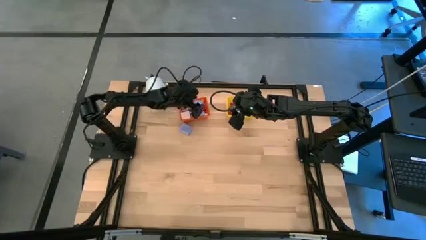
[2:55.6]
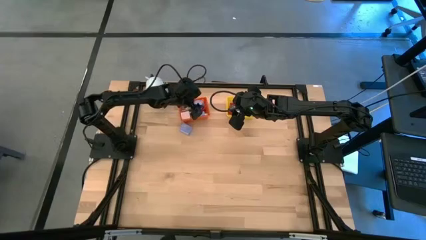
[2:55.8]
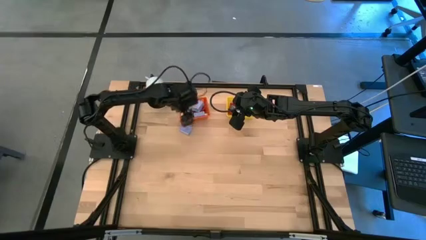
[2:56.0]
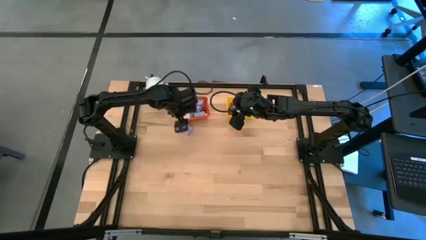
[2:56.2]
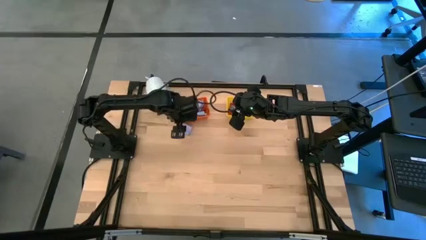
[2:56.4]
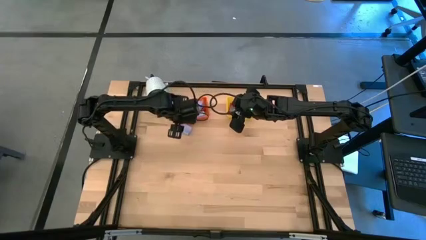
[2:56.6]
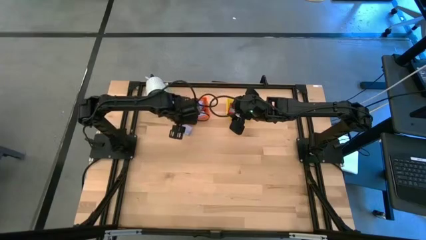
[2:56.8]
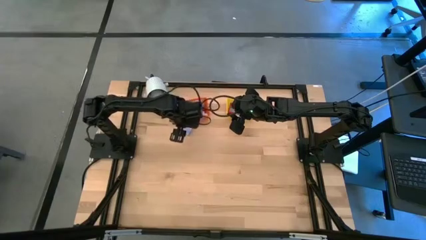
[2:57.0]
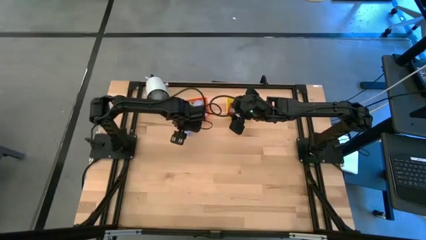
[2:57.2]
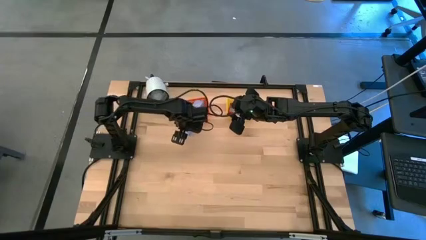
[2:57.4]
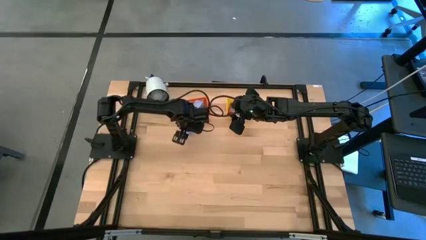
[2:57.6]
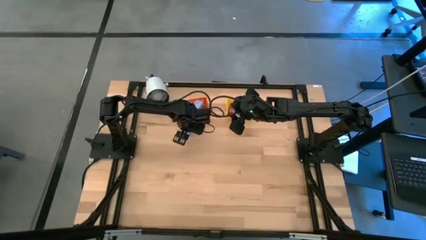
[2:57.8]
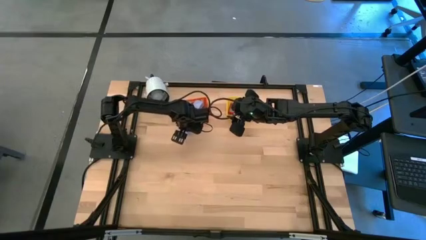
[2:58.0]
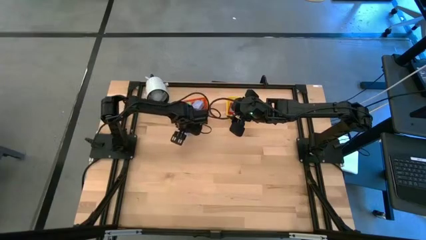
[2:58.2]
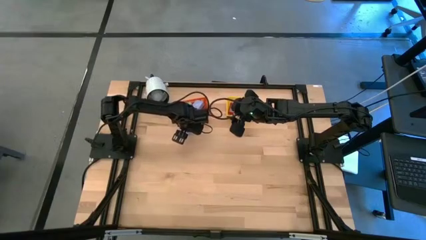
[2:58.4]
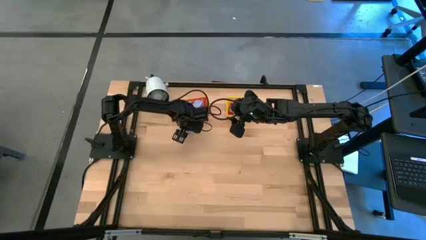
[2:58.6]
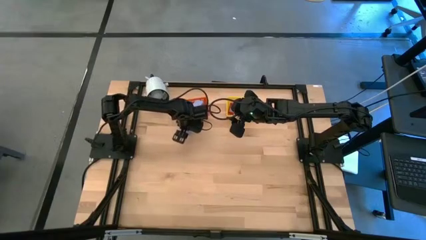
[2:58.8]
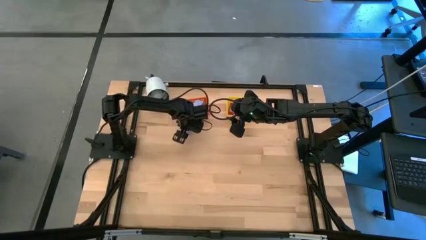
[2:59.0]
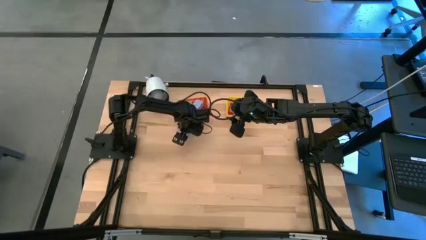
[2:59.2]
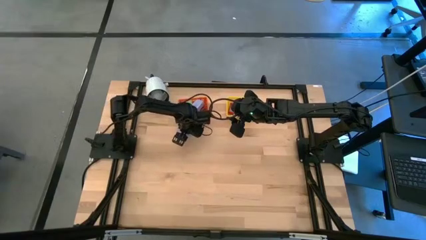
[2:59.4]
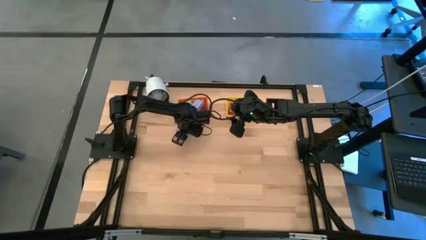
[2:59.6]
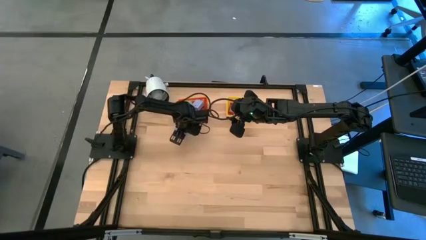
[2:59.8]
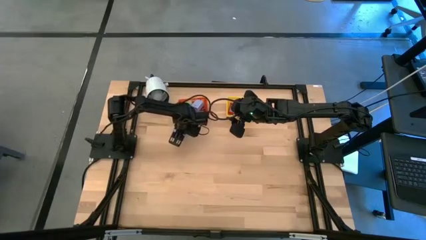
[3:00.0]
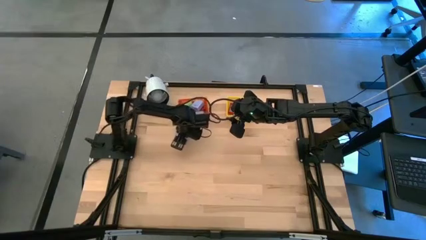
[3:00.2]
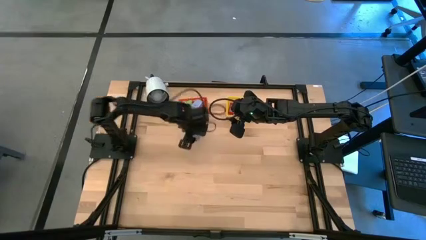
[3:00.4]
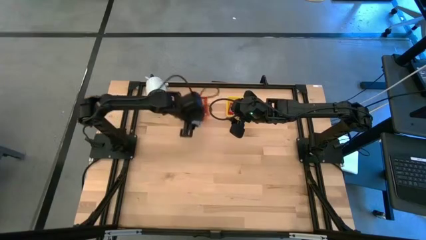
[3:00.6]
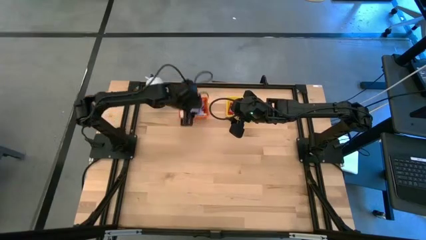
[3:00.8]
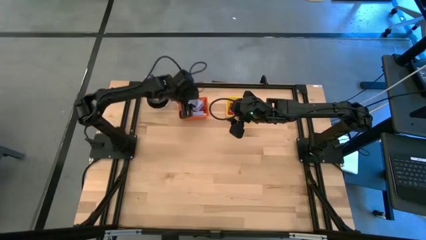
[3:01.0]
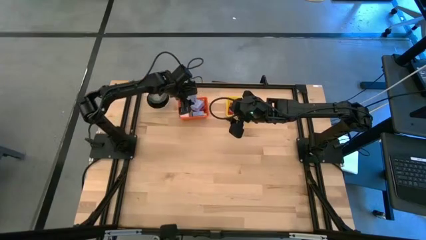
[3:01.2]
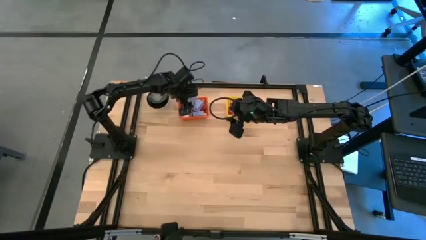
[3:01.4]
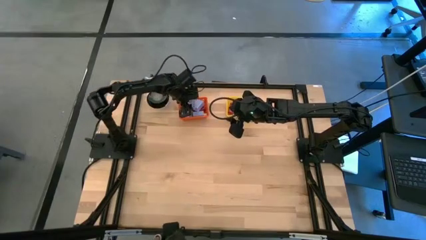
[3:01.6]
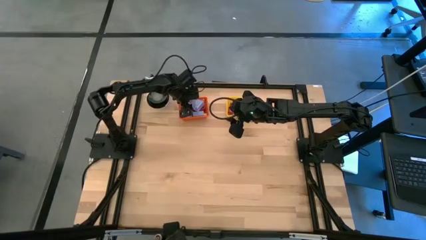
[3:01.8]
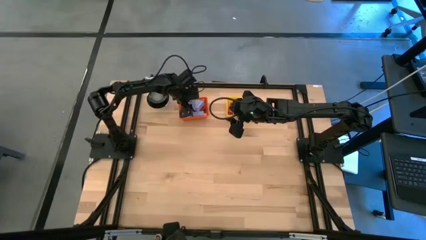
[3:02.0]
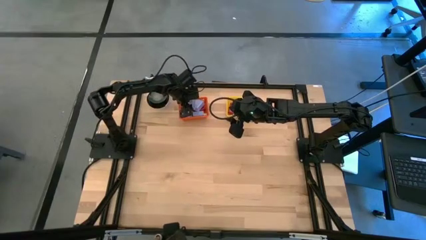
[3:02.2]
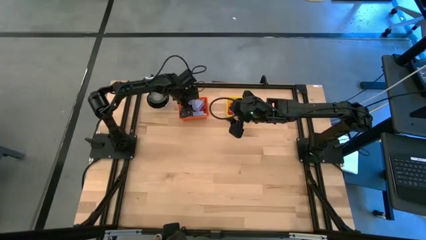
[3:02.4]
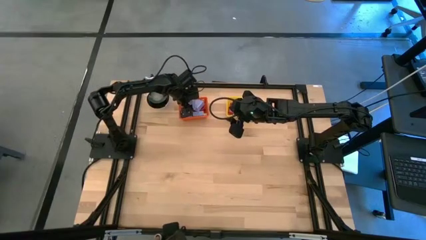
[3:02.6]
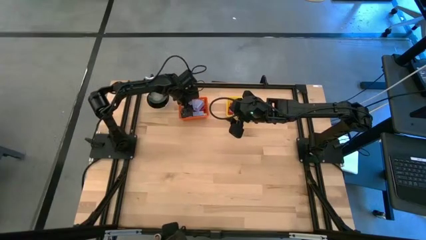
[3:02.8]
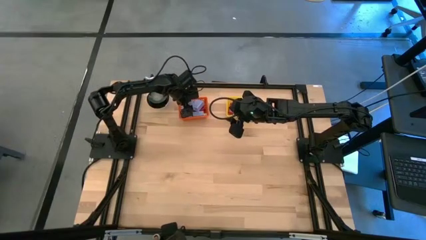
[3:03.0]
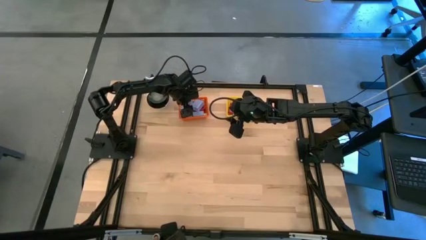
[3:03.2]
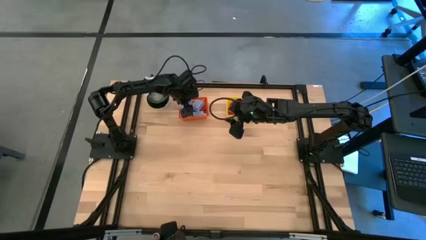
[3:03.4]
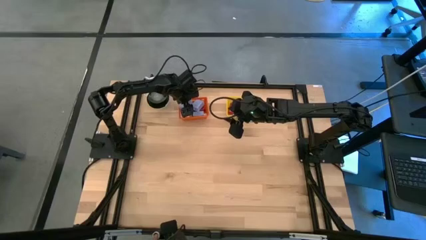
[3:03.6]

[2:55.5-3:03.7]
Task: Pick & Place Office items
Put the purple charger adapter into the orange bin

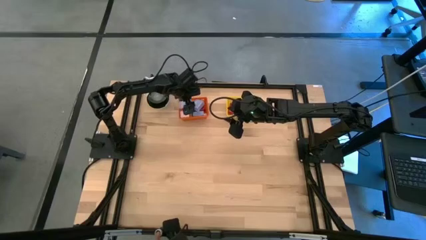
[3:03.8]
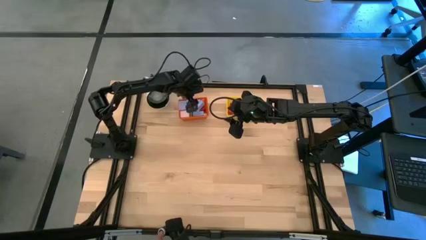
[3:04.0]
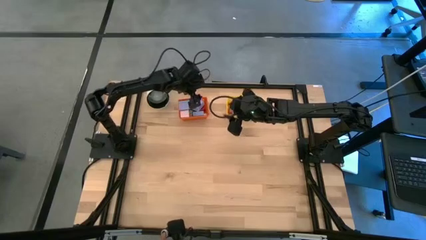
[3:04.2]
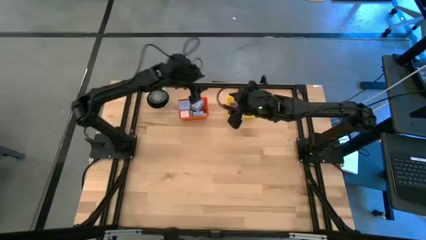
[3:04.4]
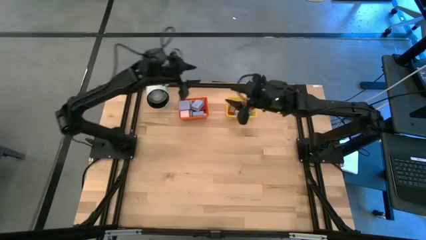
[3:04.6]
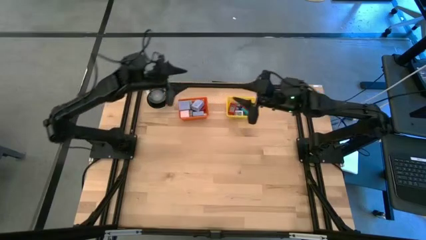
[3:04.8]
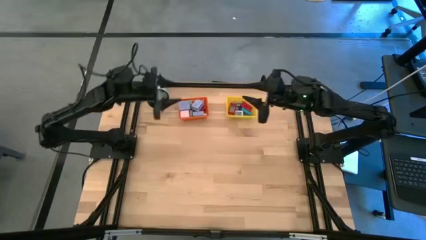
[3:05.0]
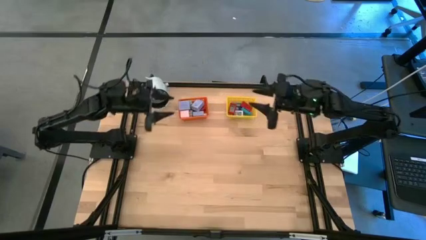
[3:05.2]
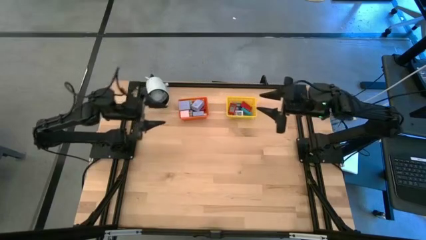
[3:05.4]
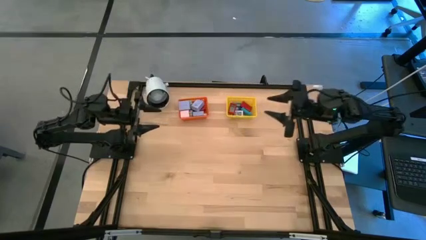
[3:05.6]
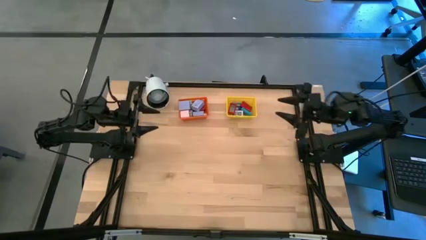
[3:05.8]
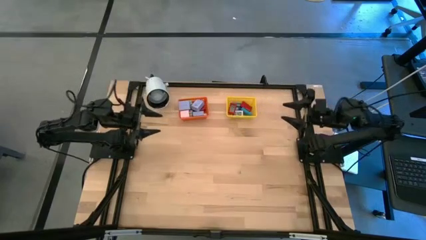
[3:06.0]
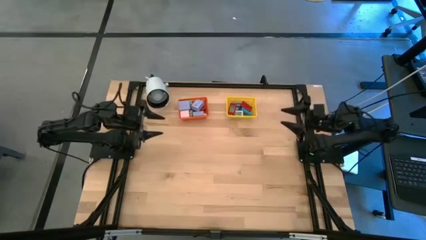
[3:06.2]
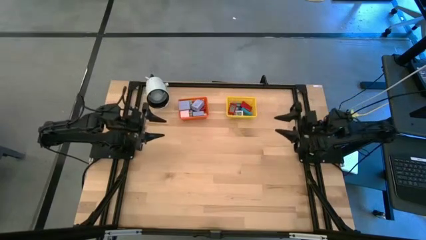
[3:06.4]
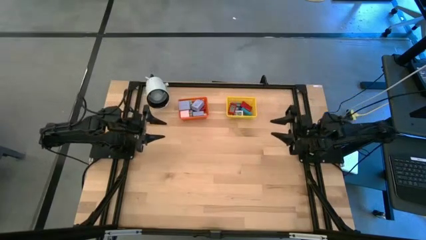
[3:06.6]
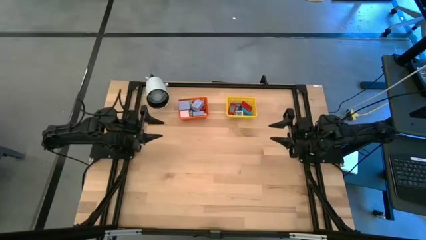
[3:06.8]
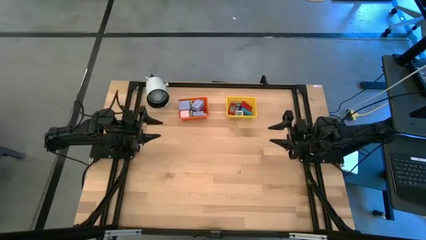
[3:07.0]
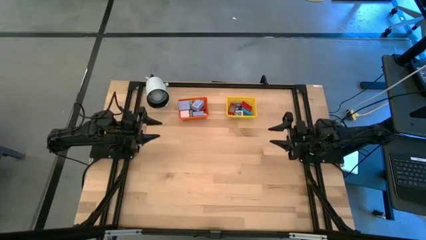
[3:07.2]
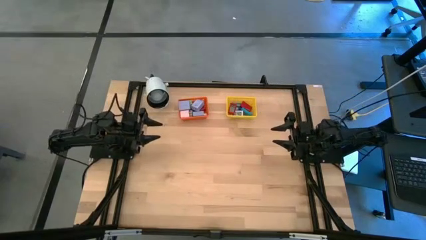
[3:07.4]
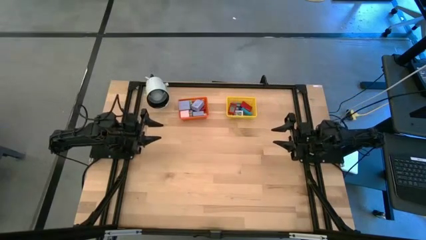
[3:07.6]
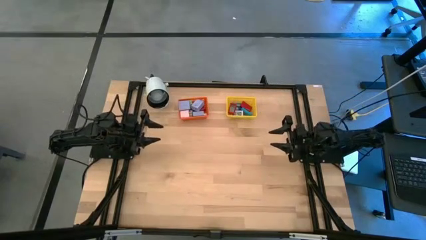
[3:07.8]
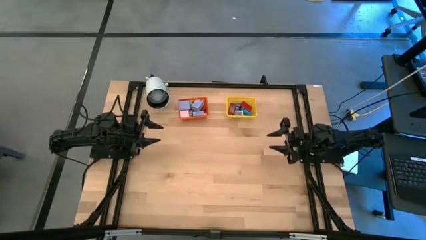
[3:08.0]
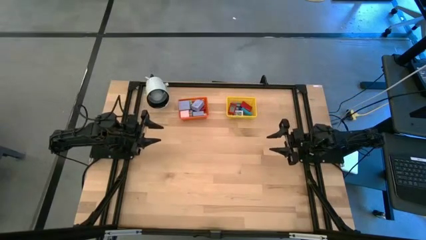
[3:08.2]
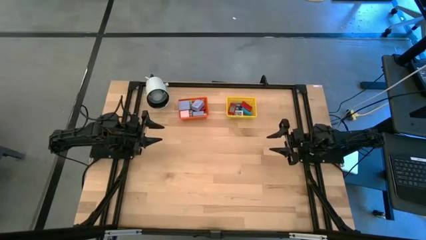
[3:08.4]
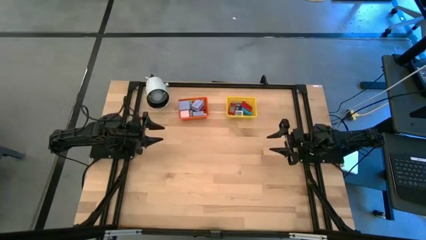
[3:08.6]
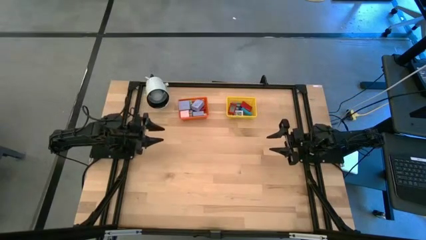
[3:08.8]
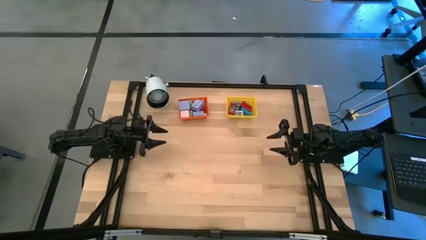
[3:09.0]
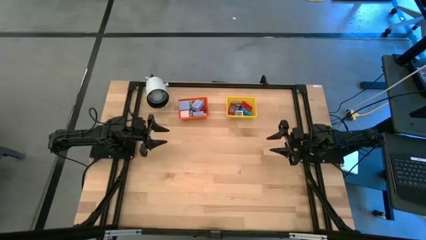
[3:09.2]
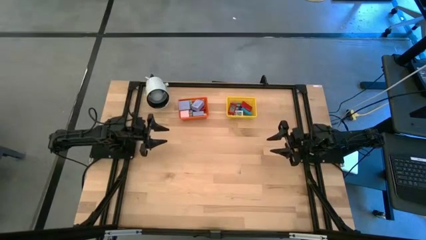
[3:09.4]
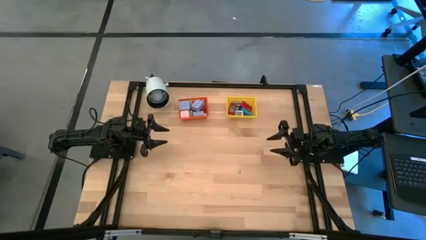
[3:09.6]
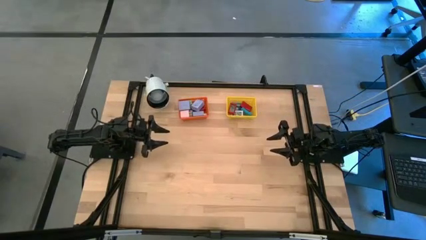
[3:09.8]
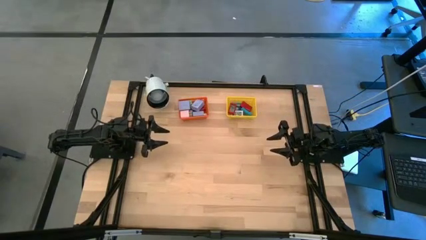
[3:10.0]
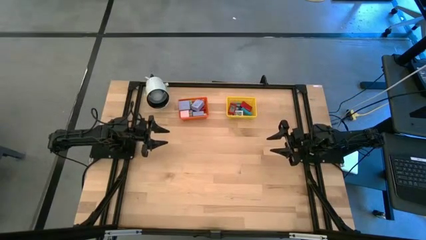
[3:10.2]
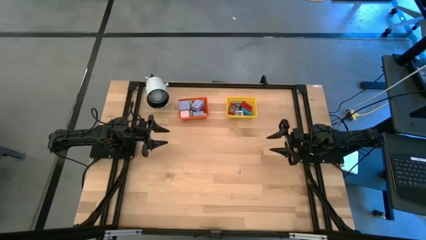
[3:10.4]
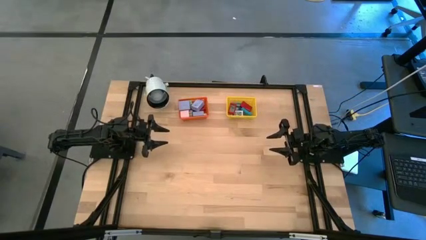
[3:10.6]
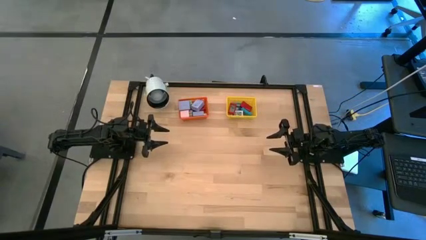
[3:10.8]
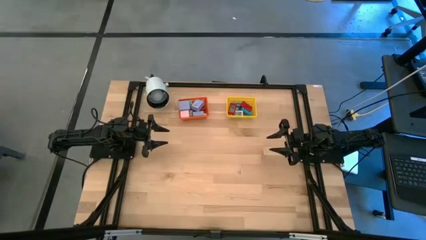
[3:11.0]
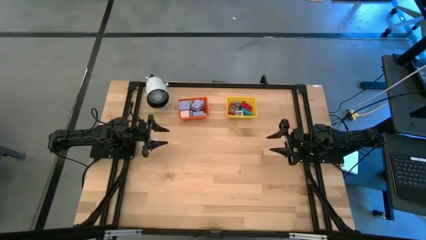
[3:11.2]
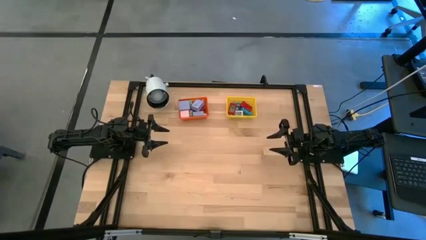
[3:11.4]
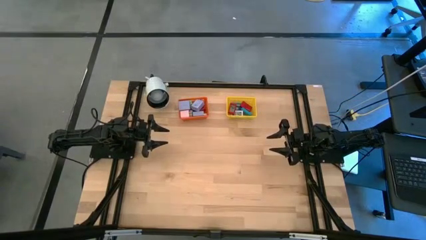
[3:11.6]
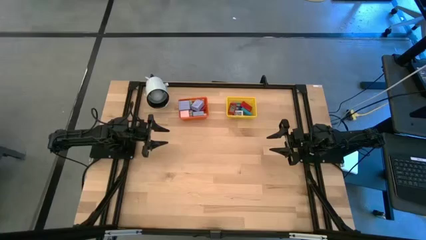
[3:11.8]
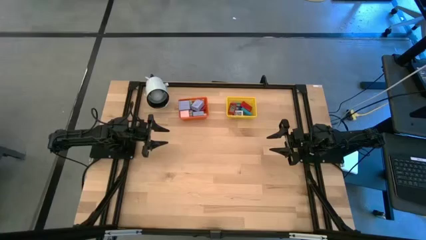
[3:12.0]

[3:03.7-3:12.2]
Return to Home Position
